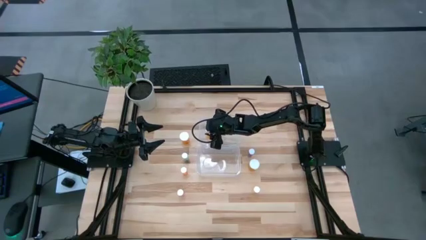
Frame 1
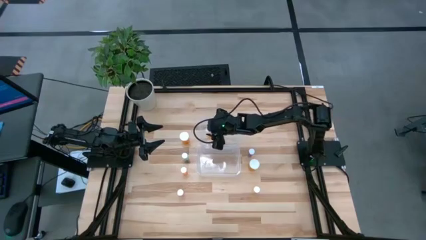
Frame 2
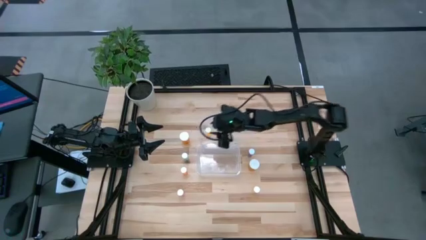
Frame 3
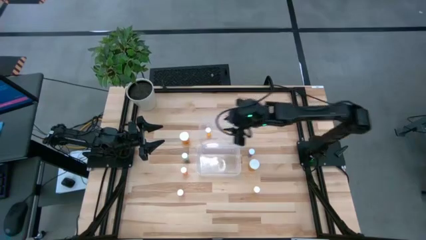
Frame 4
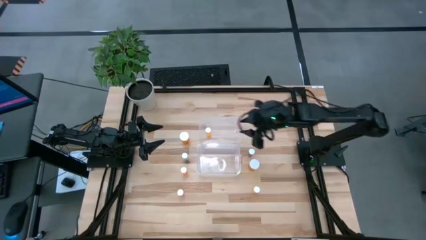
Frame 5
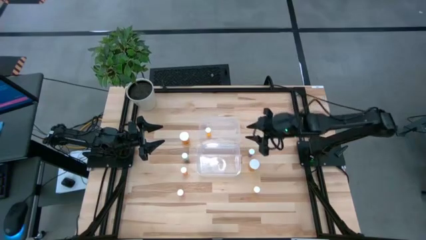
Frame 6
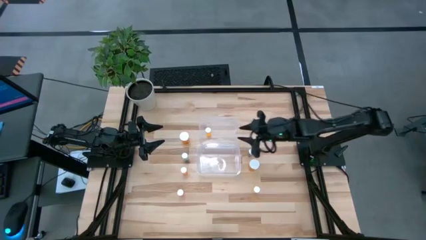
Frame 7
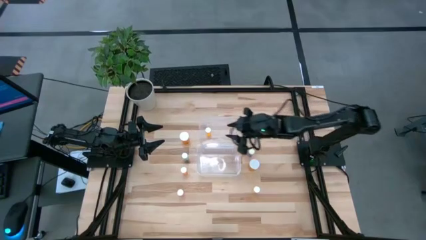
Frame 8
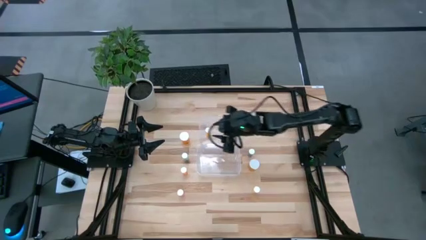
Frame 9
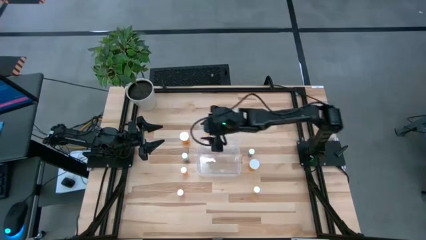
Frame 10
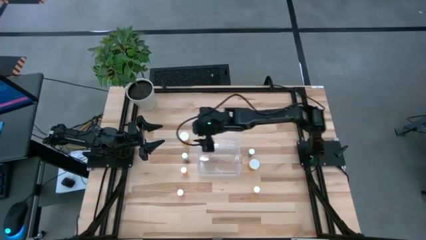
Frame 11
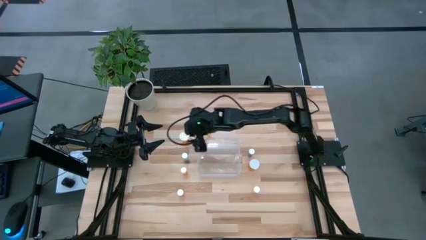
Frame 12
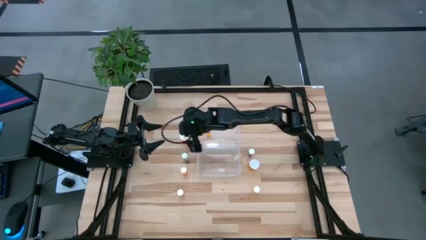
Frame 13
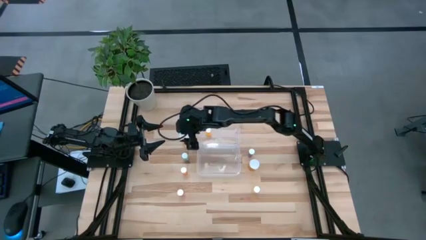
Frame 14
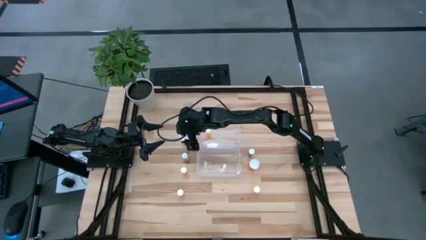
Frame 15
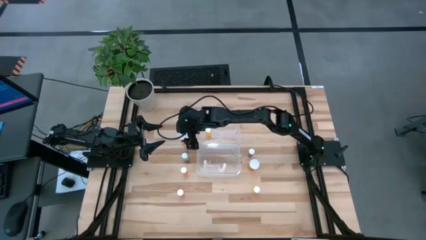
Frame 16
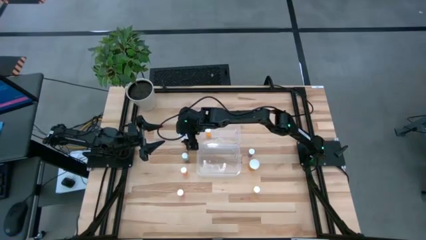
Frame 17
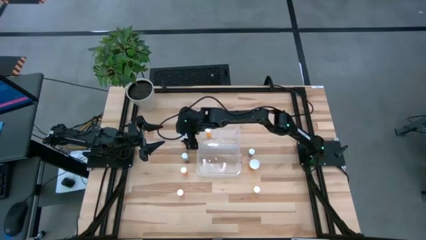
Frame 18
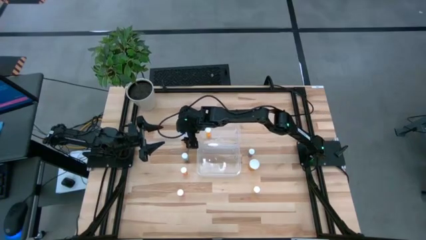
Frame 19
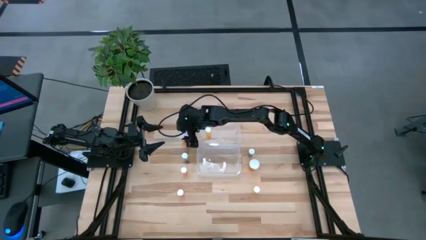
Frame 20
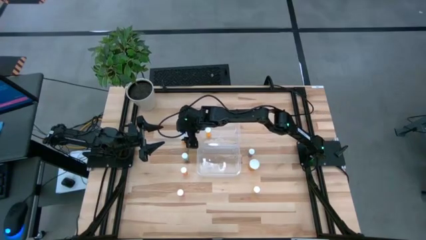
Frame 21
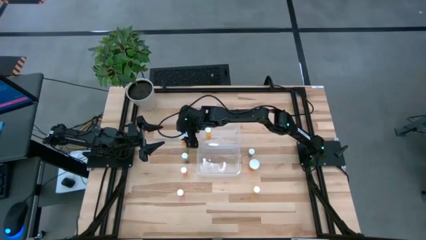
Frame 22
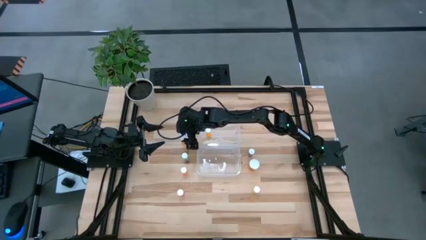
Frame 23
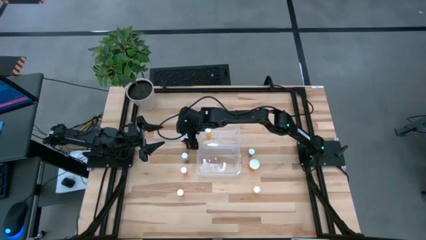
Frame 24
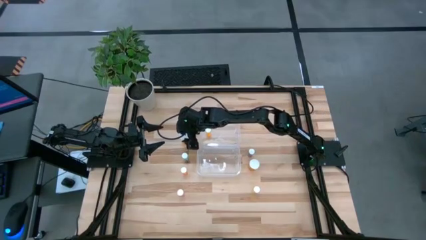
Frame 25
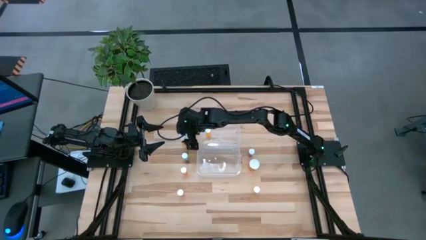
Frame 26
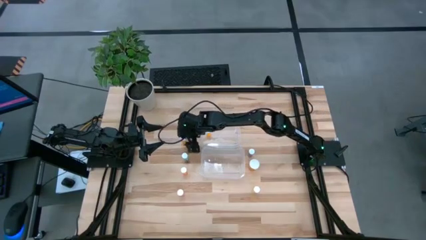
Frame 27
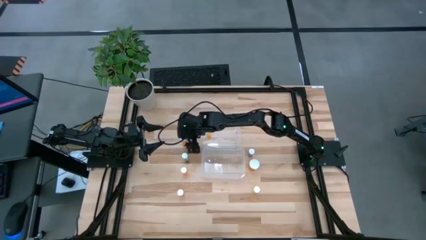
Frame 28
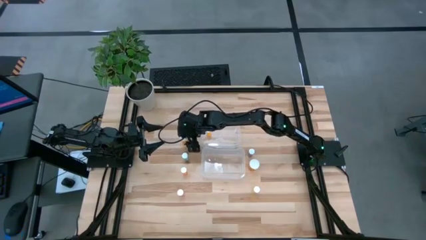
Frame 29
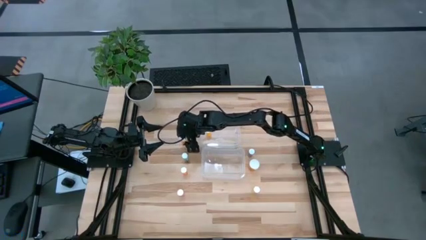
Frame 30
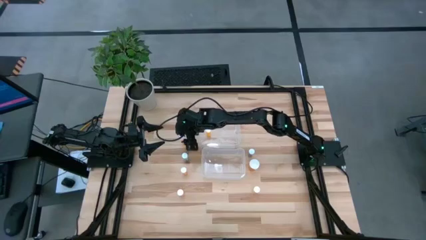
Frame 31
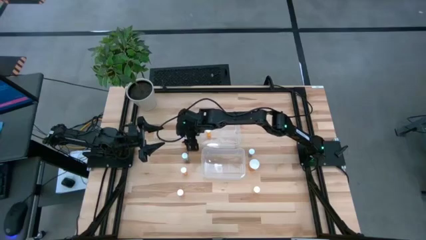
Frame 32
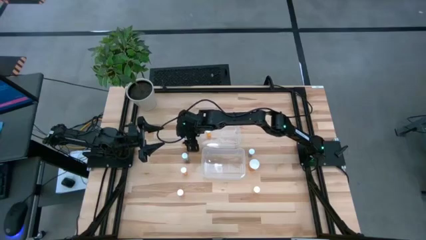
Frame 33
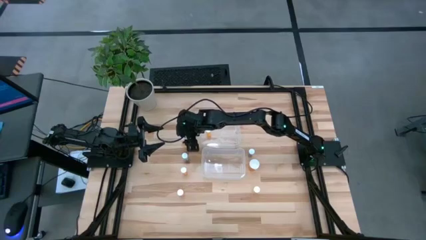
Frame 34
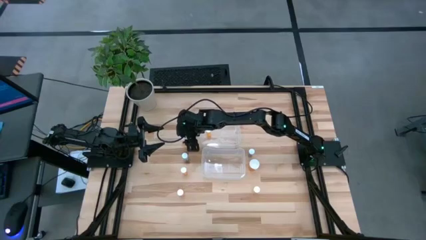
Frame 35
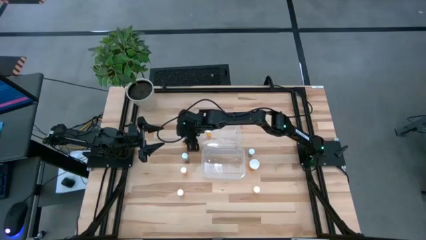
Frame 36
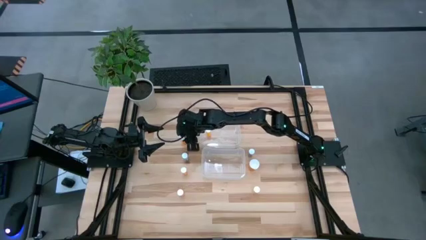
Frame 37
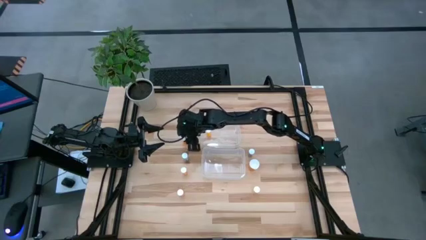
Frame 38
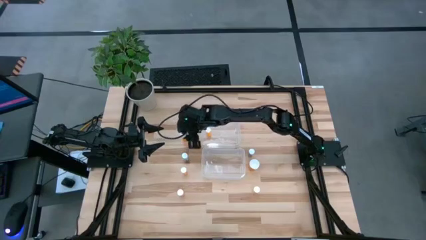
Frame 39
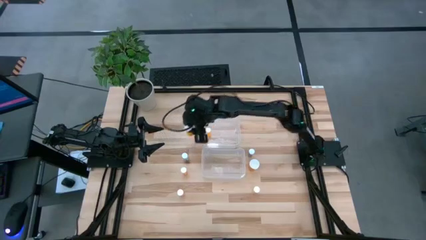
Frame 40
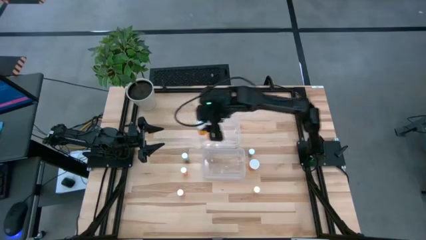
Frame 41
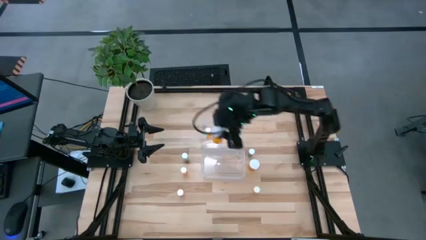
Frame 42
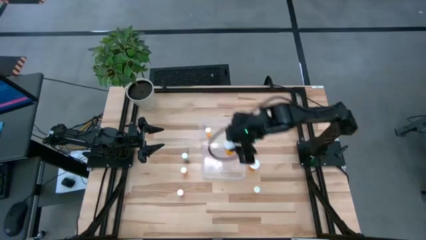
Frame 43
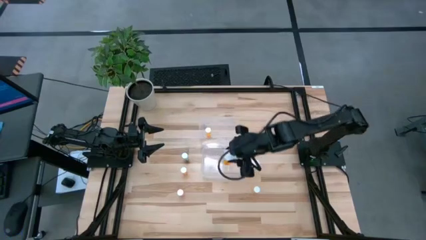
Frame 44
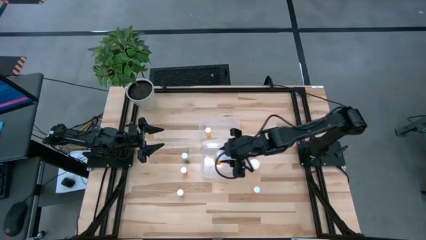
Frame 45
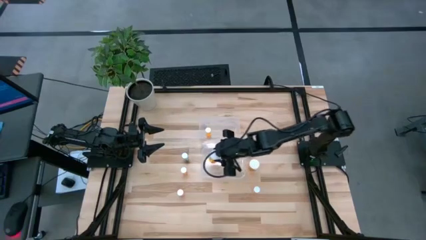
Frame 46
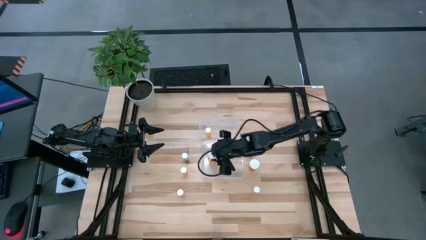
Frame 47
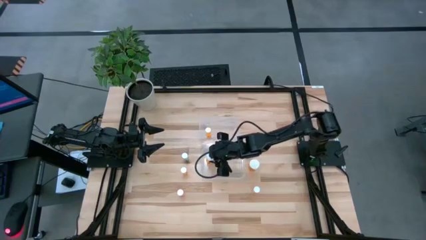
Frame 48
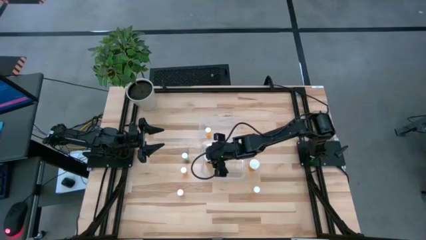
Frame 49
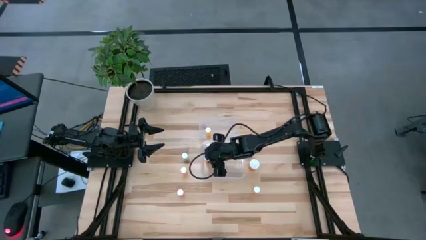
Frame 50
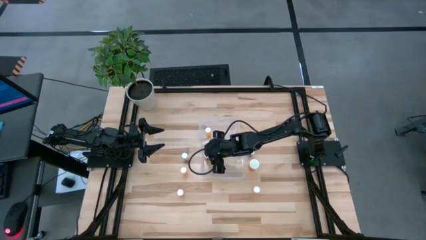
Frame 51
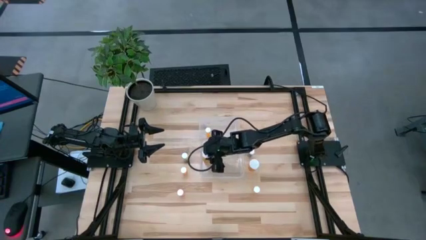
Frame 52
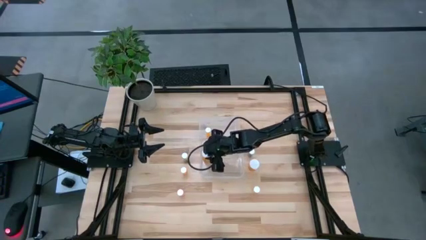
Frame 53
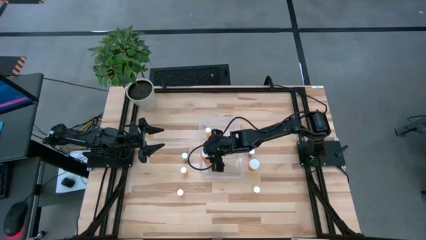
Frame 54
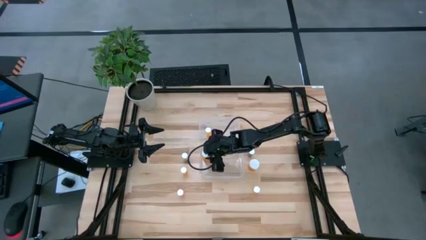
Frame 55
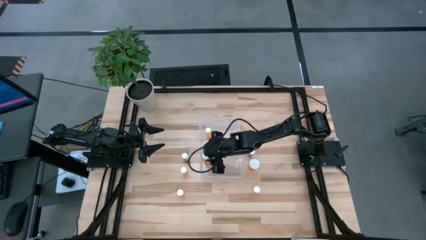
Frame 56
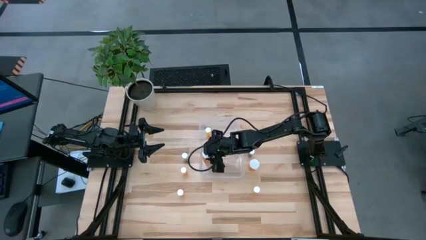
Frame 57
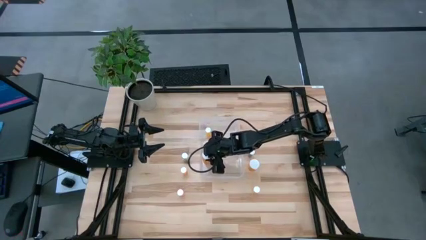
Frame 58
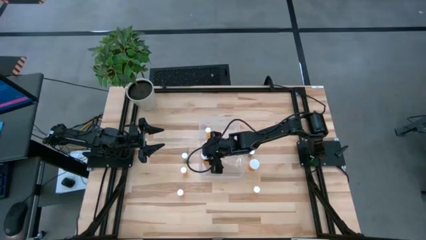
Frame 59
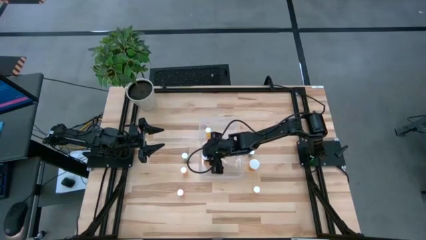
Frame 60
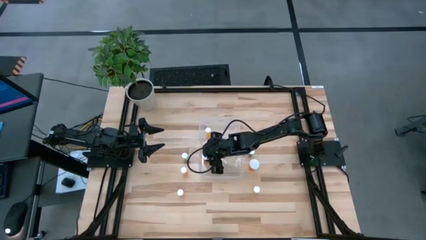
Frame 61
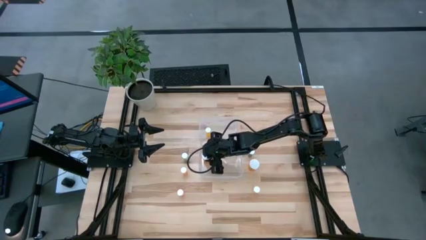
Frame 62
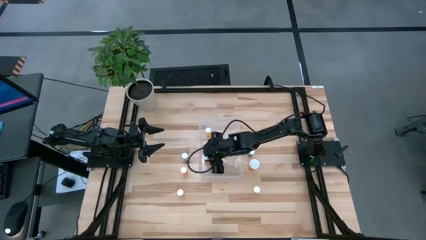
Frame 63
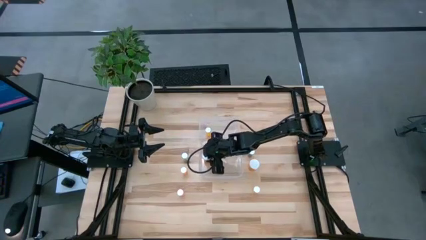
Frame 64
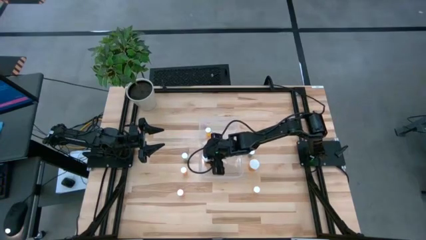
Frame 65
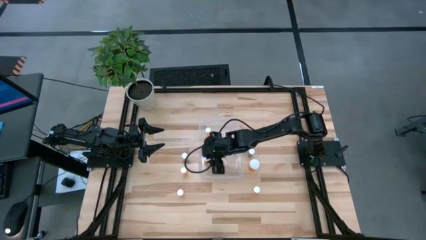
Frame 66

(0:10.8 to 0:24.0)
Task: Pick and place medicine bottles into bin by pill shape (circle, oval)
Put the orange capsule bottle into the bottom transparent bin
